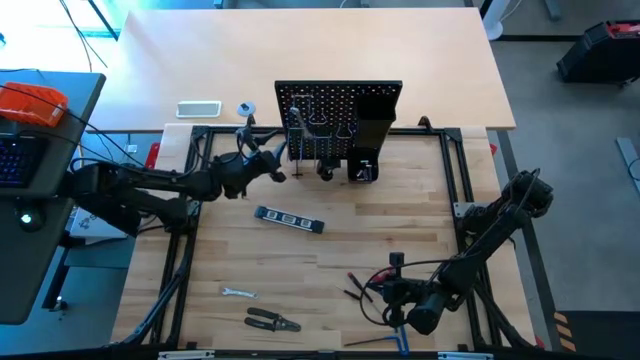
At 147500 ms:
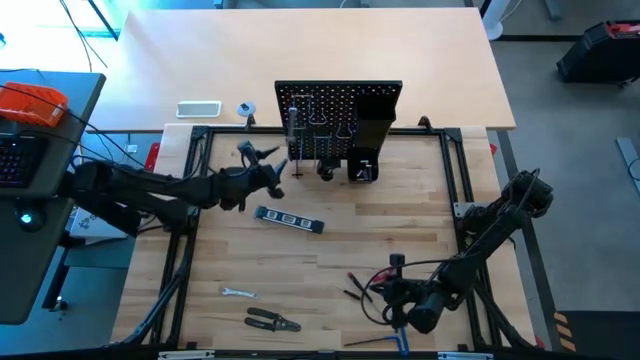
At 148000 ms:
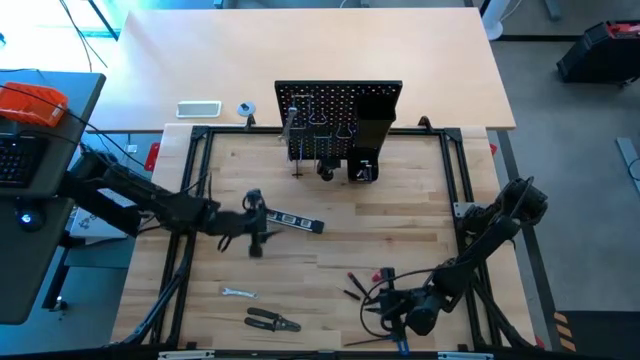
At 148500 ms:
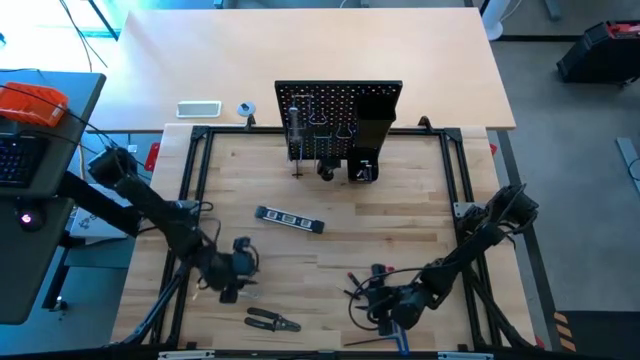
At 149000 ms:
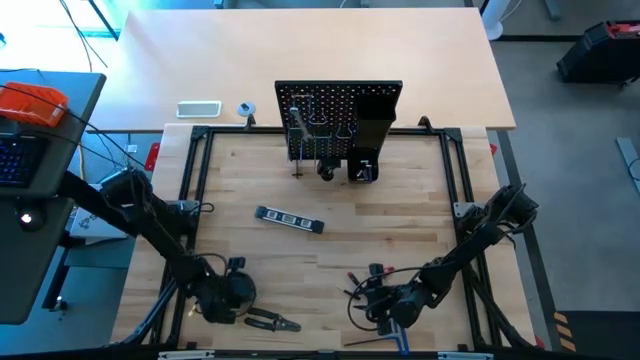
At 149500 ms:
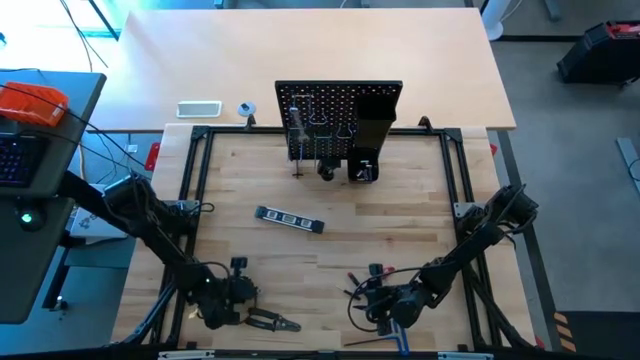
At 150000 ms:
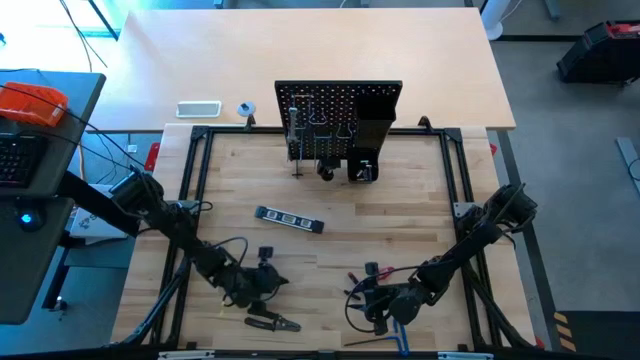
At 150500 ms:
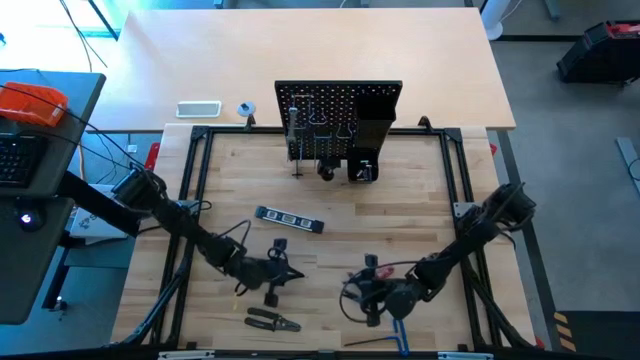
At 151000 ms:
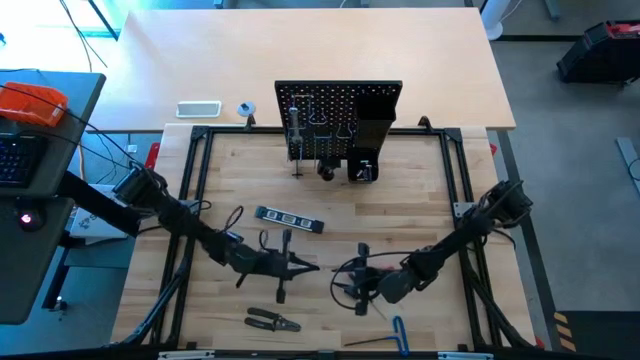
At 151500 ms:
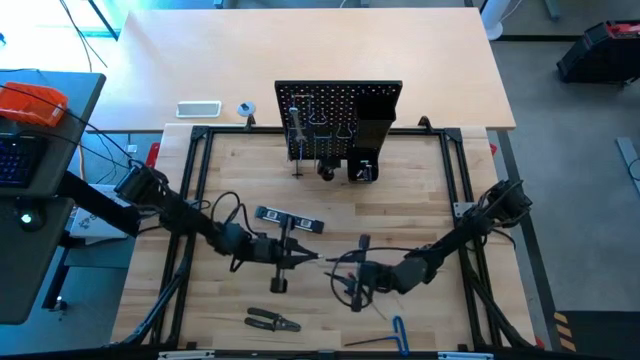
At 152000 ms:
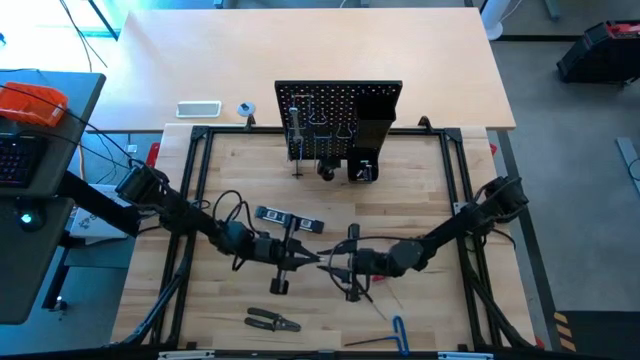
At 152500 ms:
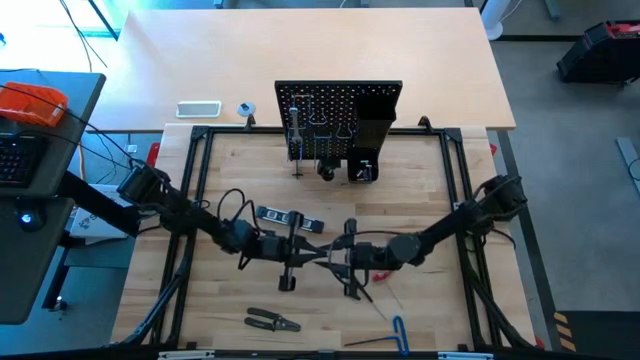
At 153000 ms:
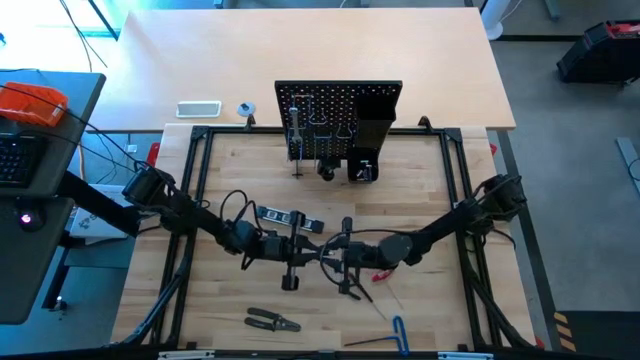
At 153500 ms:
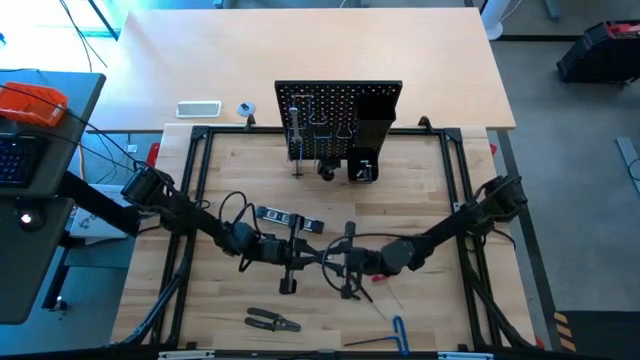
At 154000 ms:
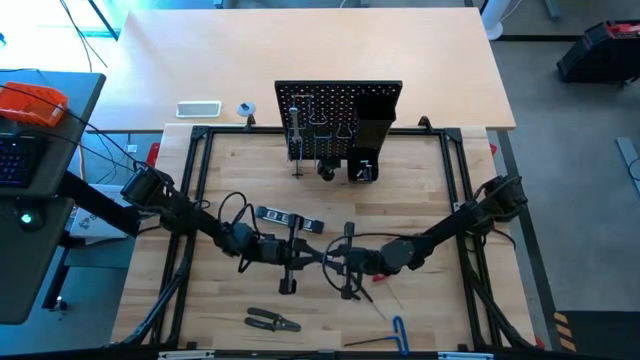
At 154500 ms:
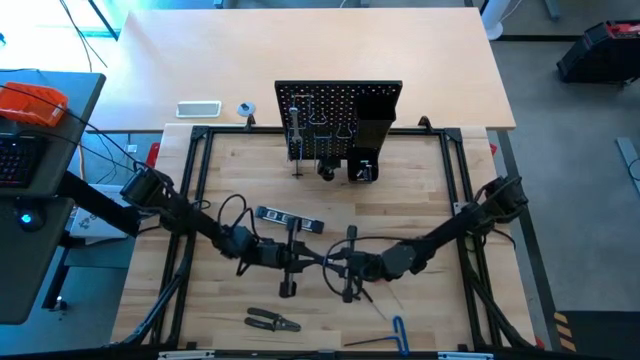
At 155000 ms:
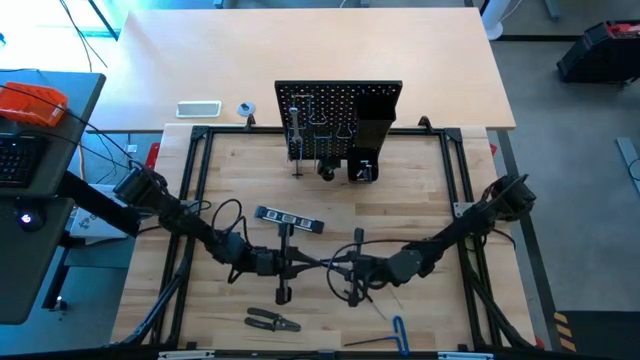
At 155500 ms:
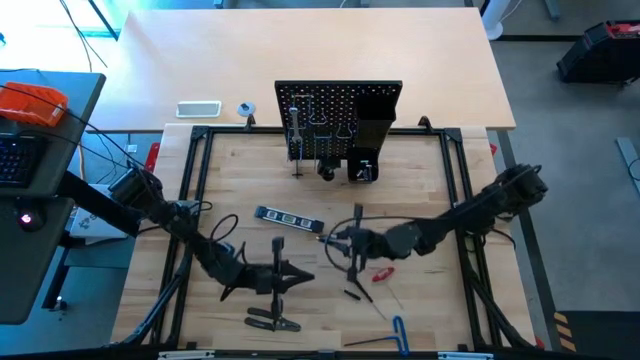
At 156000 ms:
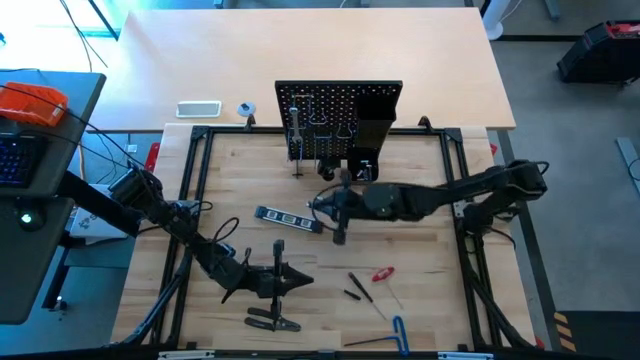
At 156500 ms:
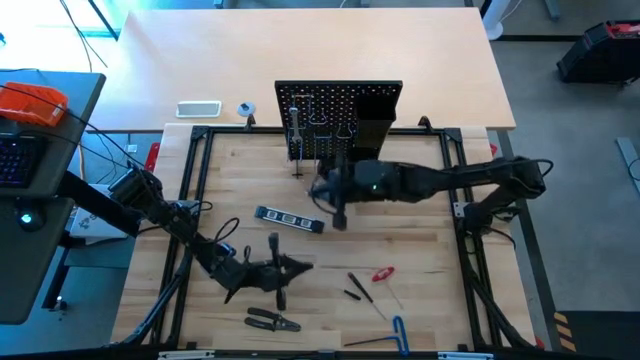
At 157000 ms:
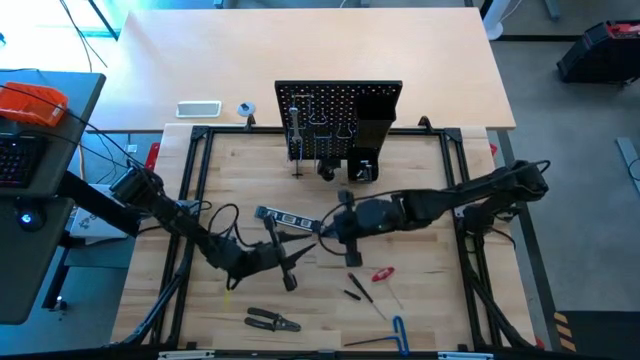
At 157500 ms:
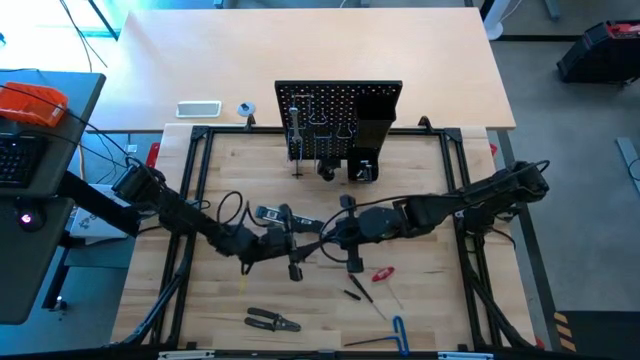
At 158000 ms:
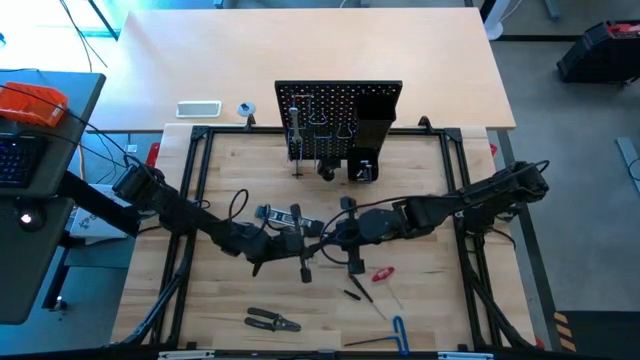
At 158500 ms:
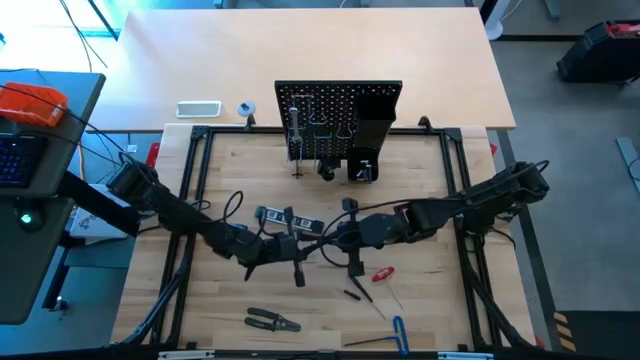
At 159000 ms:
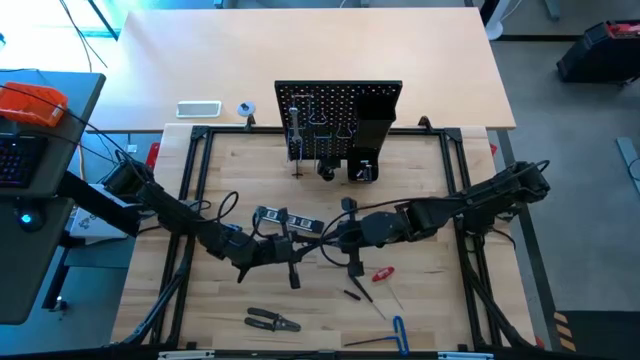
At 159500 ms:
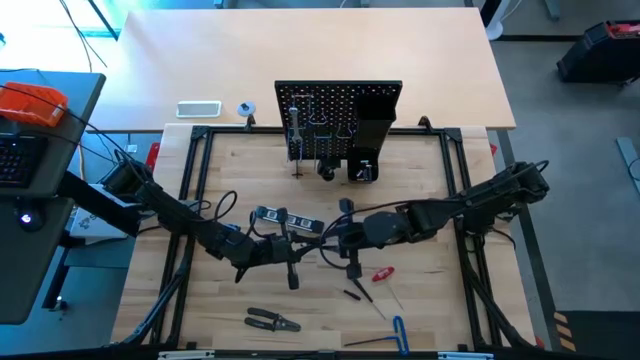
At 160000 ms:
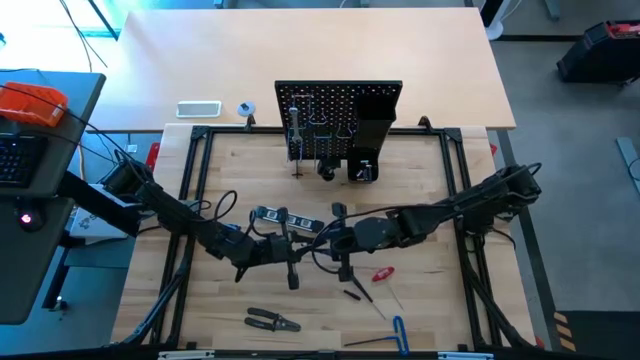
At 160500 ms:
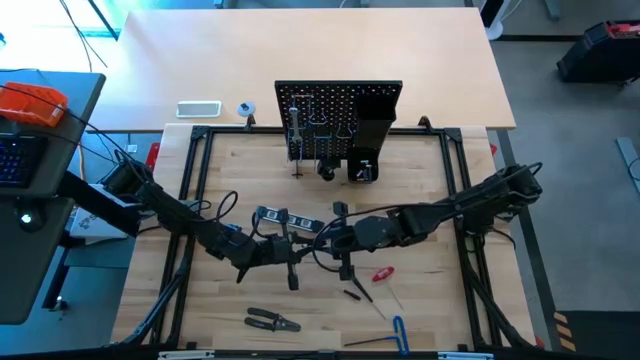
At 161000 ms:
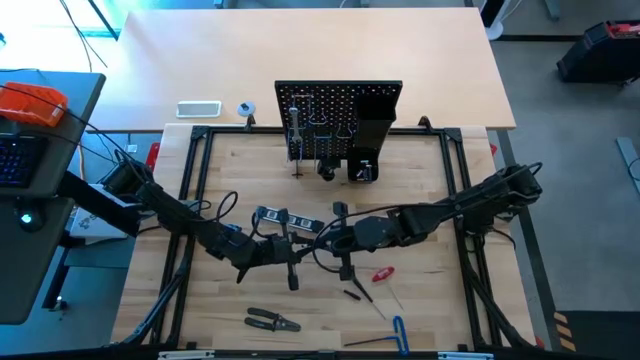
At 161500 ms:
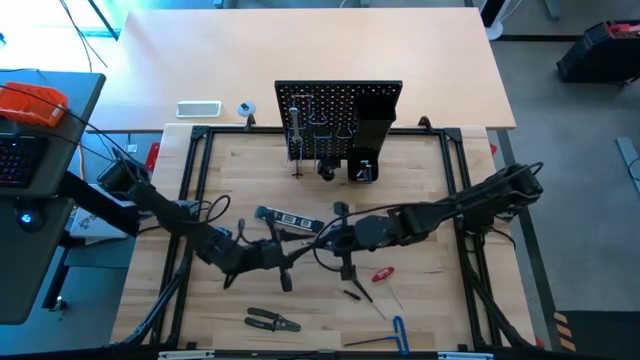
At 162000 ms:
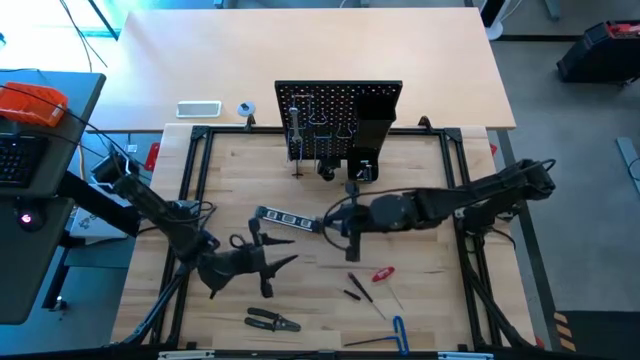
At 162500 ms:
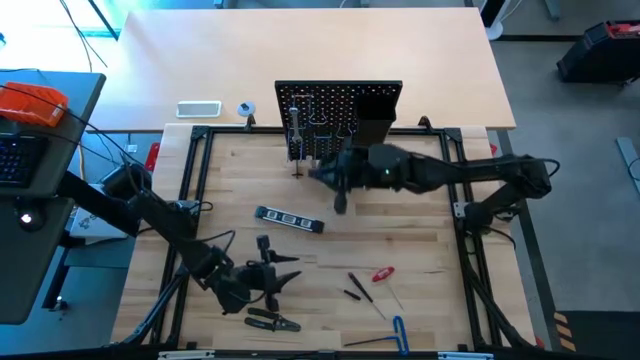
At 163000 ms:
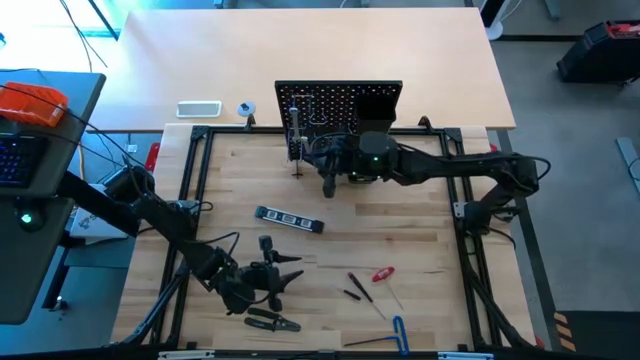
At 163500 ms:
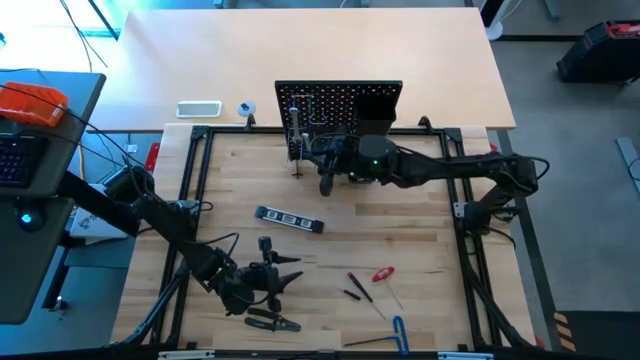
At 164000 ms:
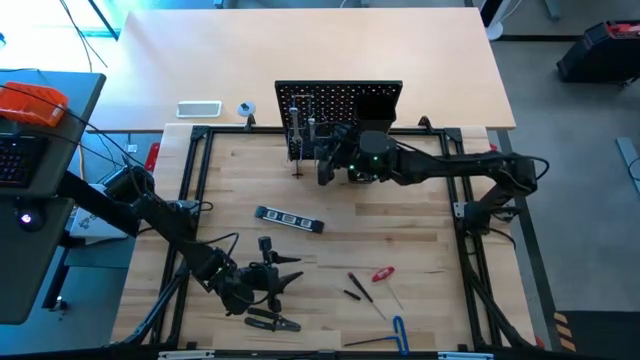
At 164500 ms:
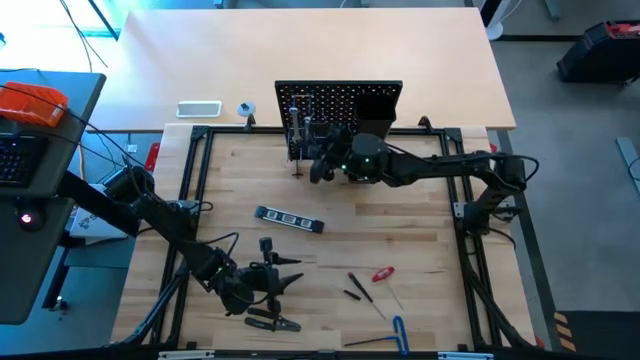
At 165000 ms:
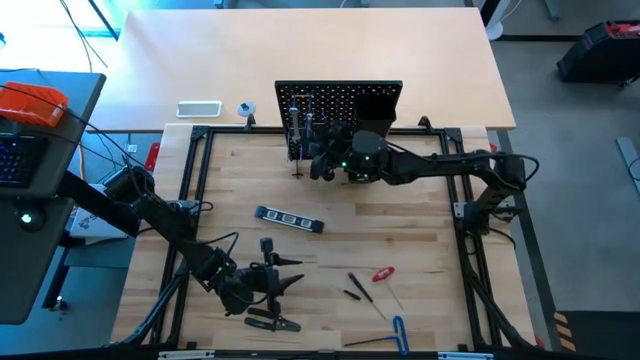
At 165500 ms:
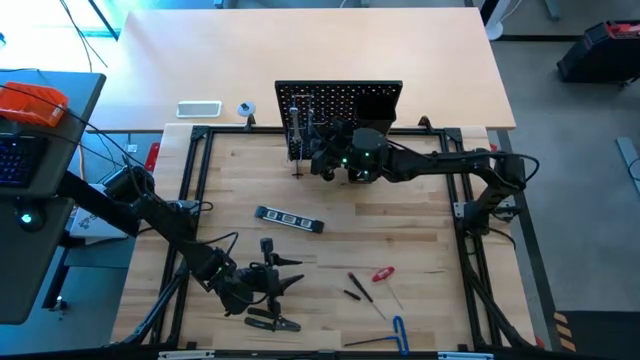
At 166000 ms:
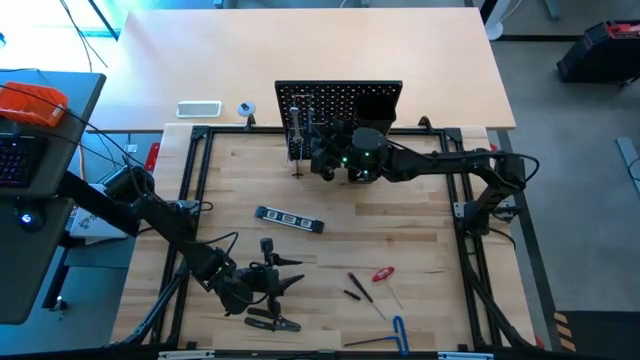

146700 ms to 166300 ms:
Task: Hang tools onto peg board
Hang the small wrench onto the peg board

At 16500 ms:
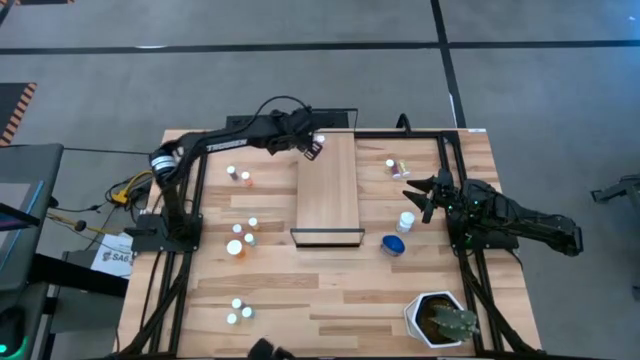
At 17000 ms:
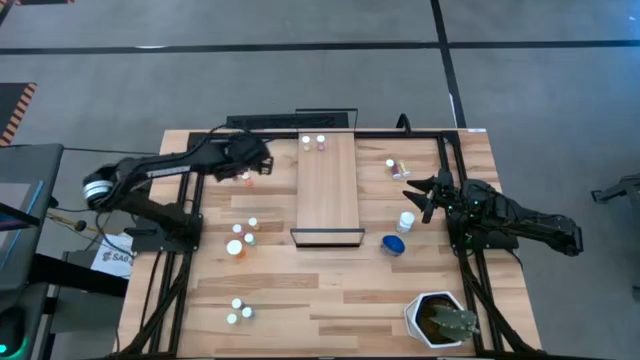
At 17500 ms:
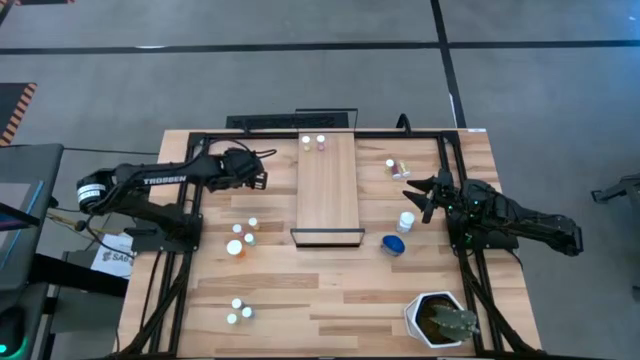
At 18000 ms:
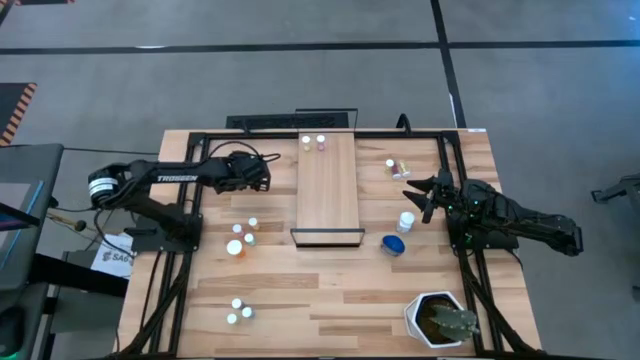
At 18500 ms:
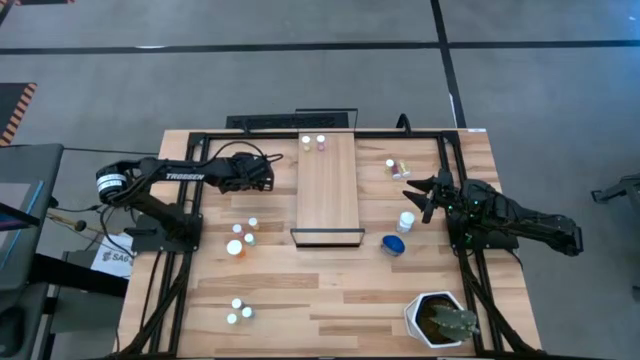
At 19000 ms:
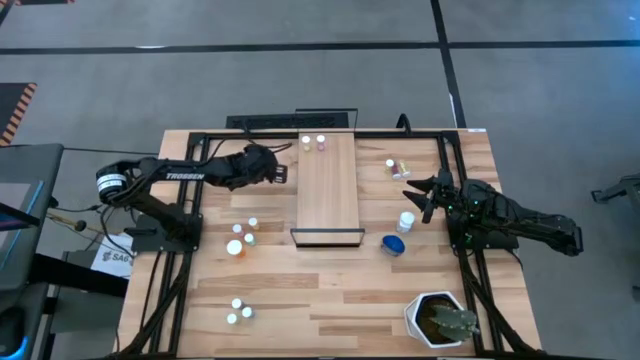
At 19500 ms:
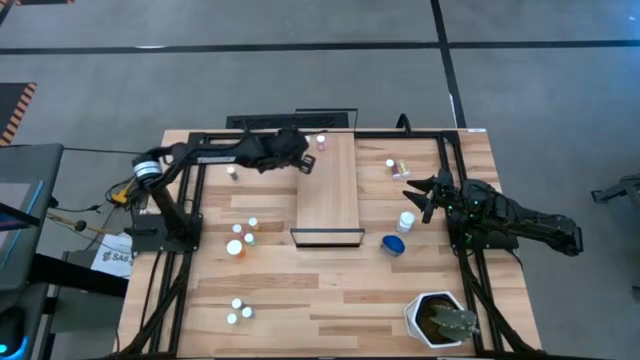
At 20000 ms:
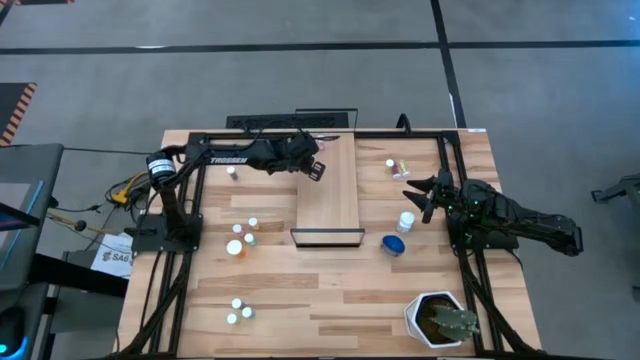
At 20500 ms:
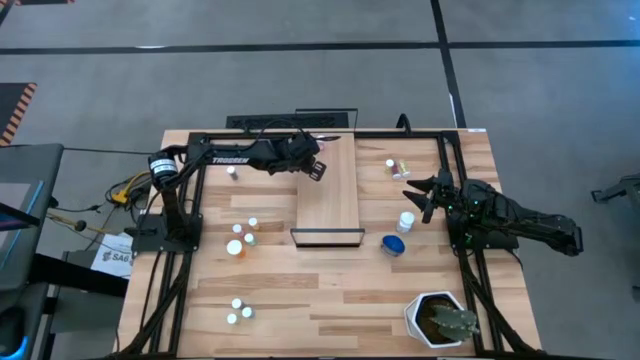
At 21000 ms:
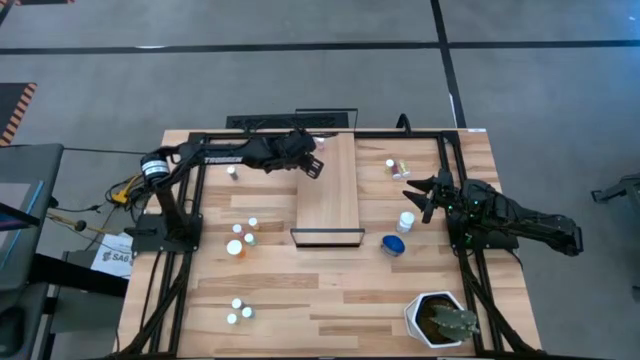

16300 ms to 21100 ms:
Task: Pick and place medicine bottles onto shelf by color
Put the red pill bottle on the shelf
